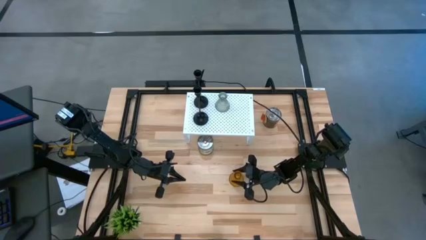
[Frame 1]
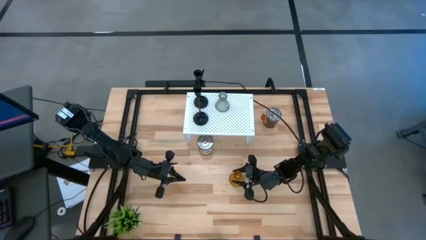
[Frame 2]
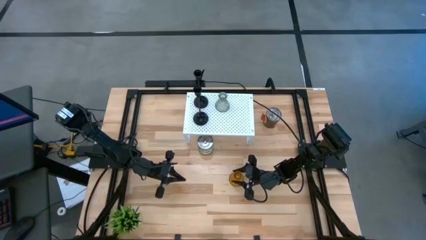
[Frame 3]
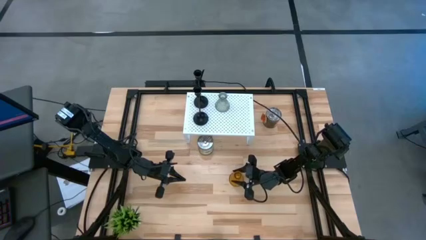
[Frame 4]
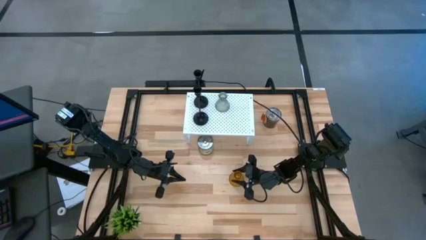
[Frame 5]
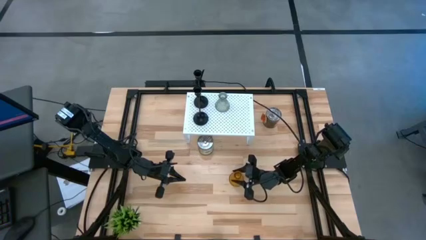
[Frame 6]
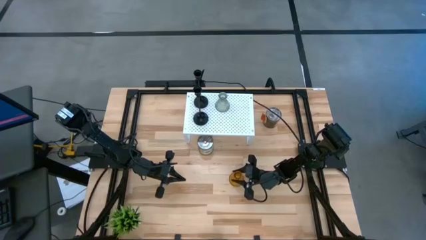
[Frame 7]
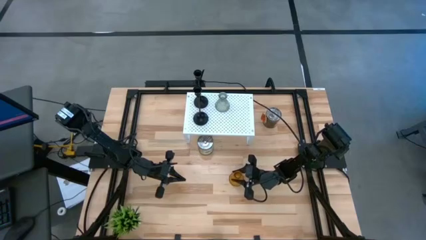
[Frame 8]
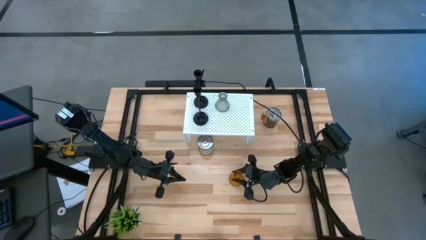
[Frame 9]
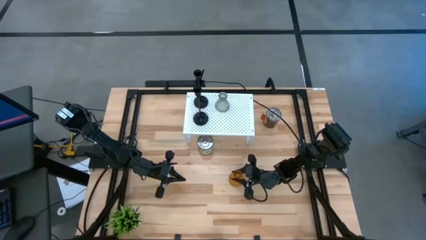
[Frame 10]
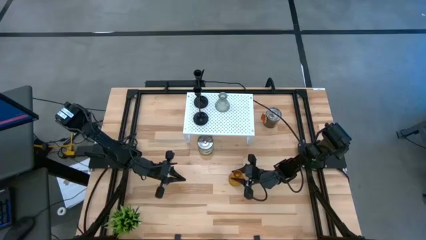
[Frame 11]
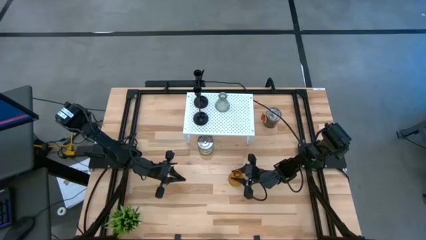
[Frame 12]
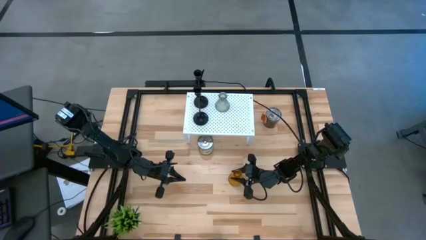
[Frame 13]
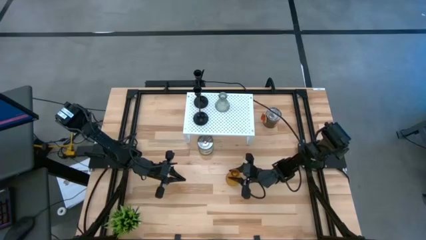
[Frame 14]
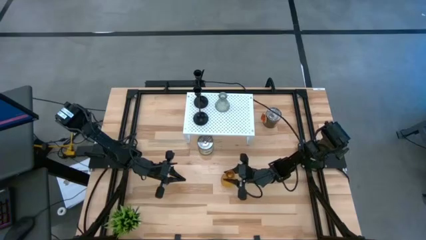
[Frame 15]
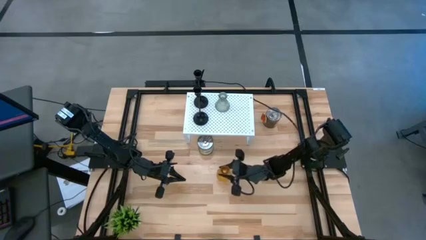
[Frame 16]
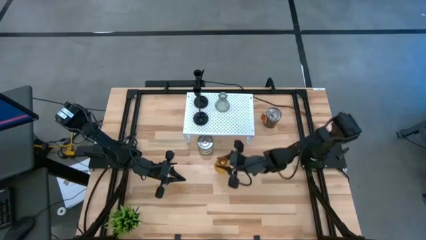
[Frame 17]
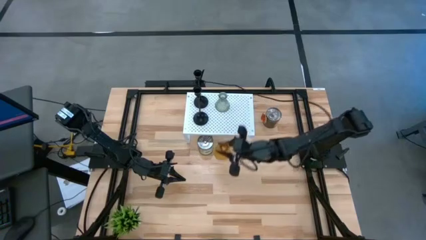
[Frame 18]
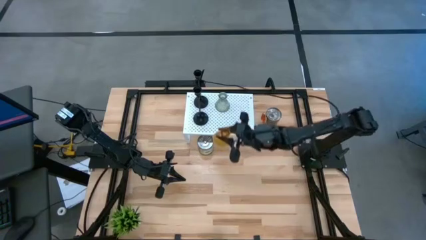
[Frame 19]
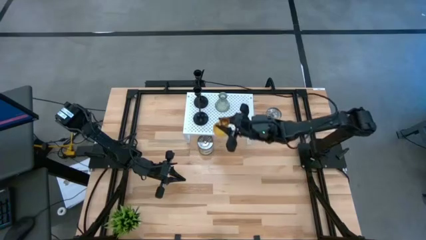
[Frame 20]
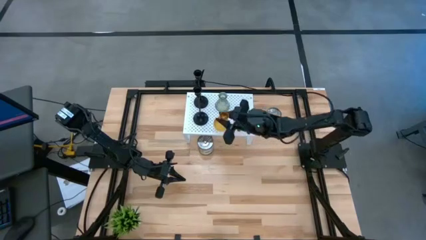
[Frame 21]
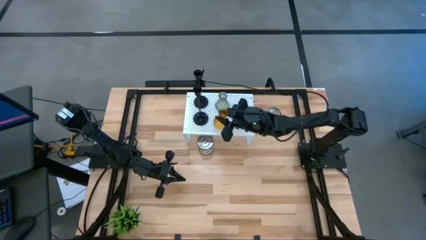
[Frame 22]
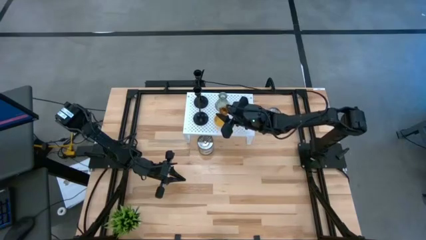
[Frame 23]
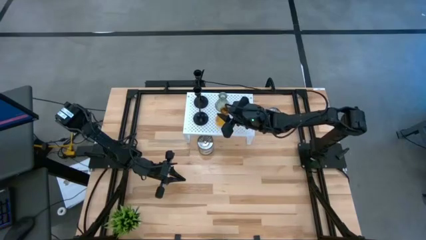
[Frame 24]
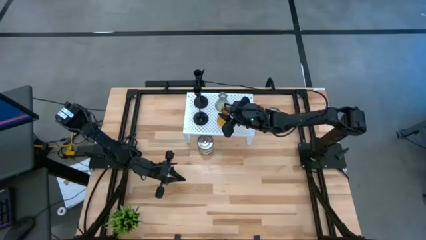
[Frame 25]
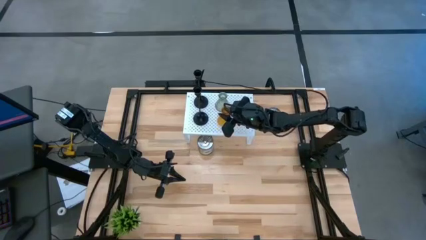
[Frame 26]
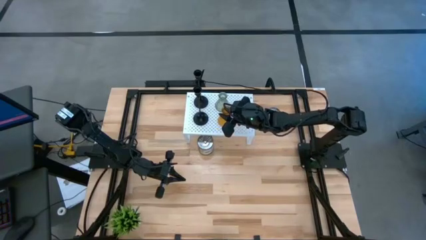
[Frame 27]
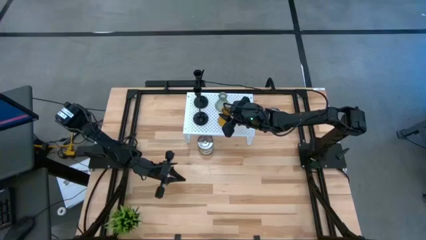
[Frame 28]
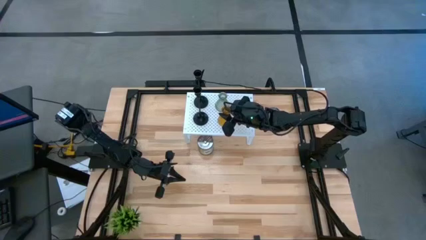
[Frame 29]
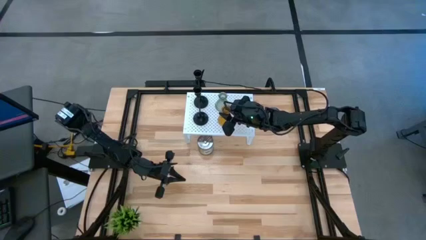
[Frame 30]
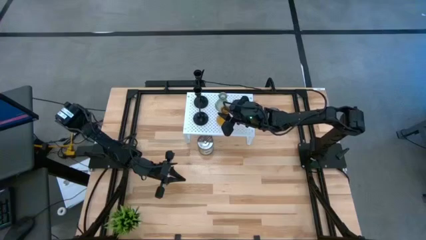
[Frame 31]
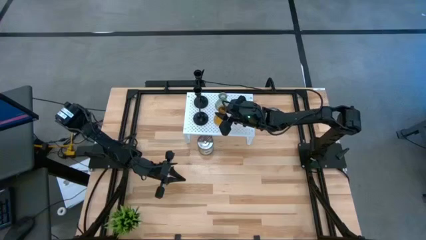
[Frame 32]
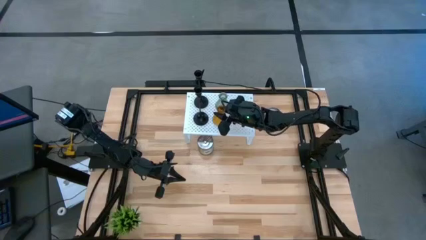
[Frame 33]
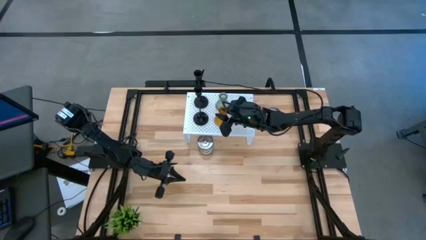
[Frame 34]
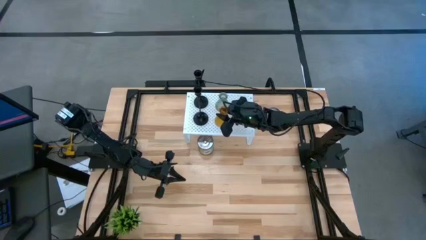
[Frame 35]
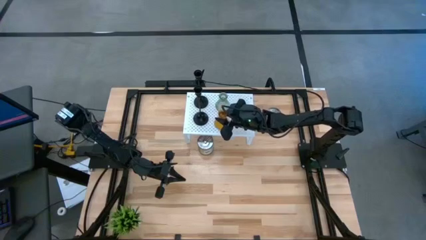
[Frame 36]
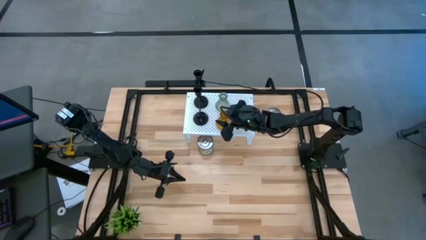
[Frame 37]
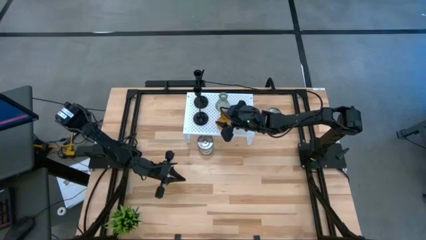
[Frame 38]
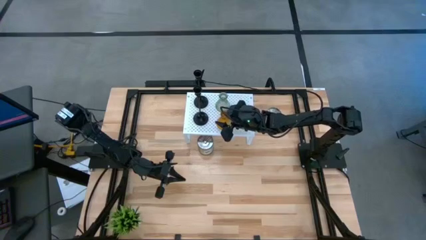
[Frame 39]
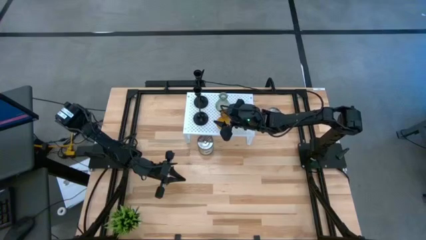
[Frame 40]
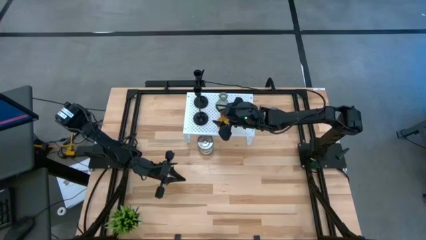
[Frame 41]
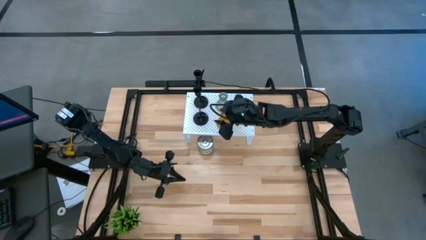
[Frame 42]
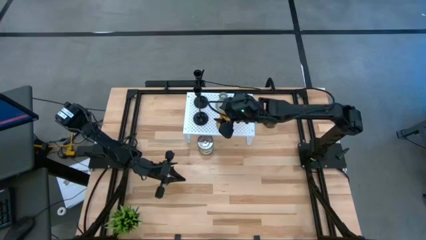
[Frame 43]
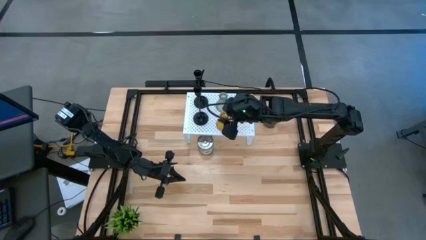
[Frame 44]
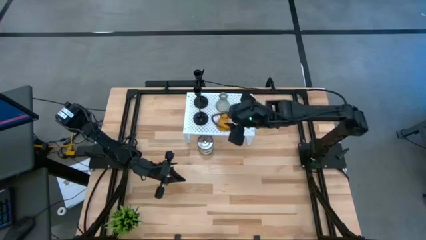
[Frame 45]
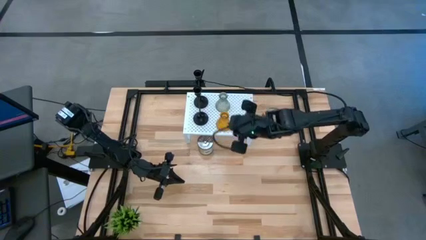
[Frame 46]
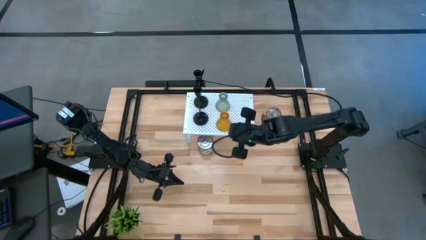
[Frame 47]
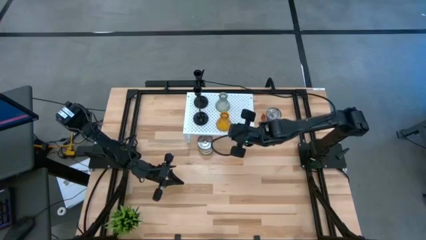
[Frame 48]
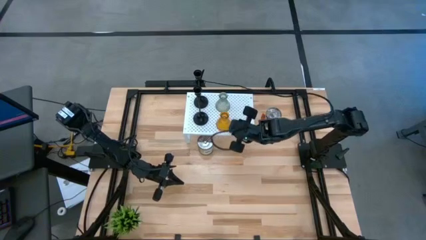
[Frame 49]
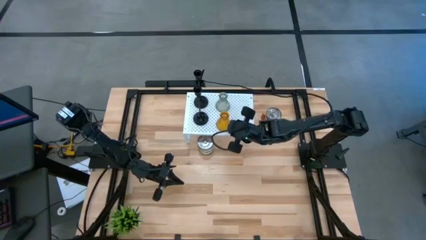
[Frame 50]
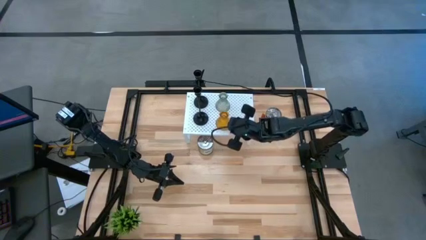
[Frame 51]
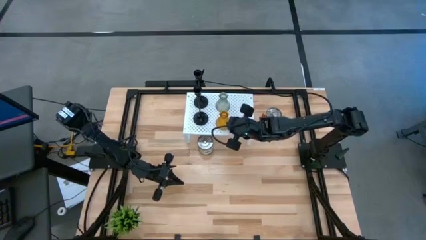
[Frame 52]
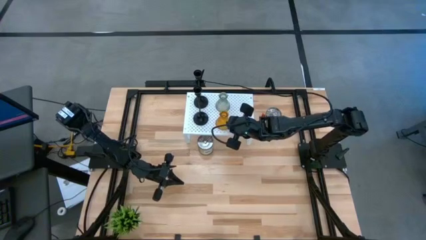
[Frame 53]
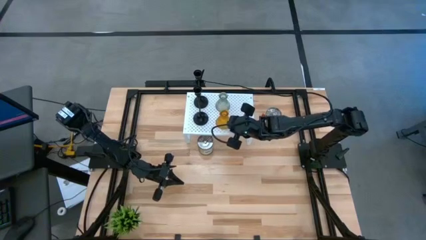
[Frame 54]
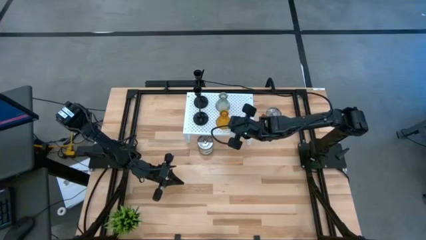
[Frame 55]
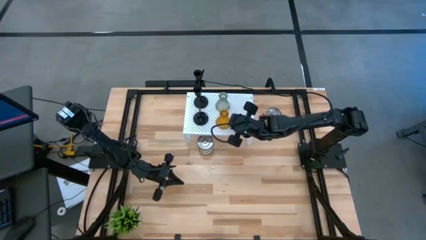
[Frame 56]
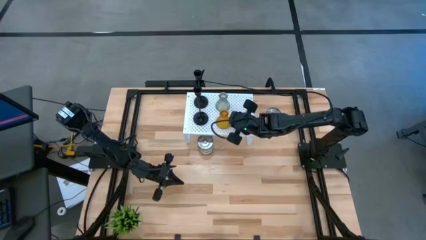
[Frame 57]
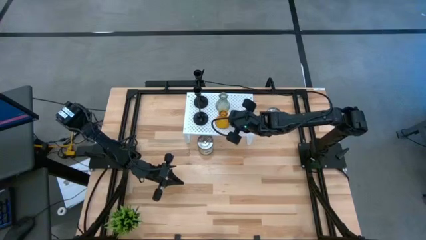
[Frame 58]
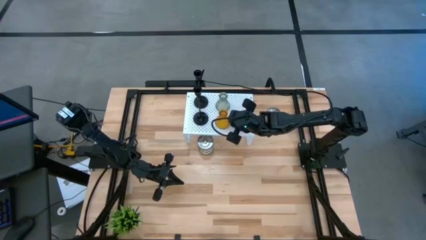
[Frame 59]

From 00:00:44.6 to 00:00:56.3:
Task: Pick & Place candle stick holders
Put the orange glass on the shelf

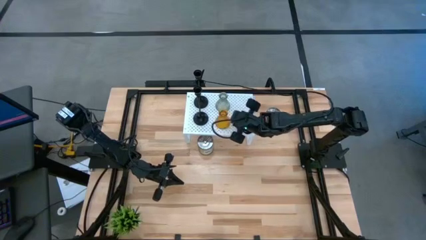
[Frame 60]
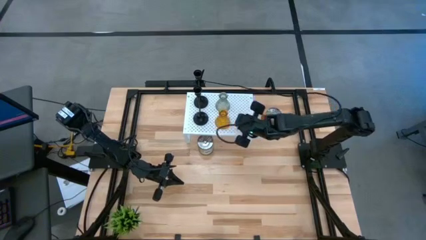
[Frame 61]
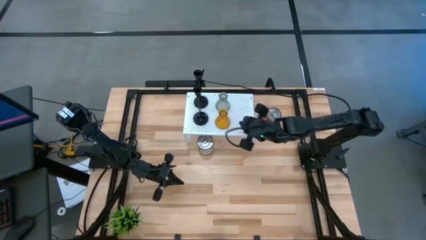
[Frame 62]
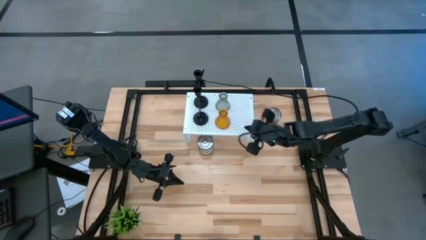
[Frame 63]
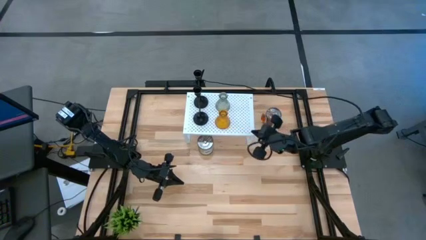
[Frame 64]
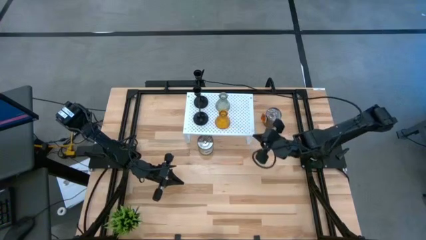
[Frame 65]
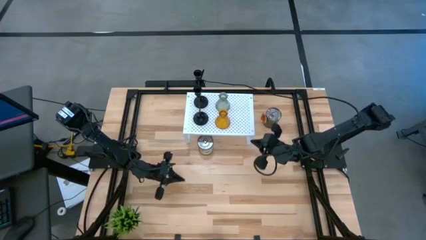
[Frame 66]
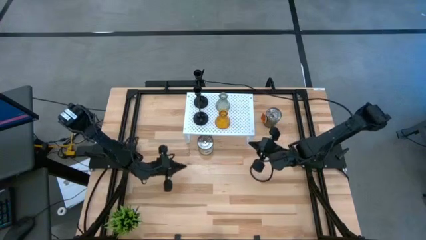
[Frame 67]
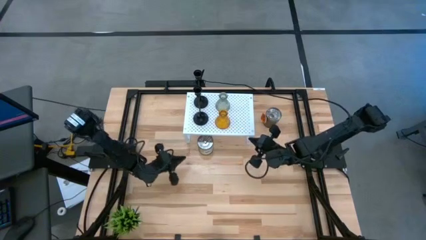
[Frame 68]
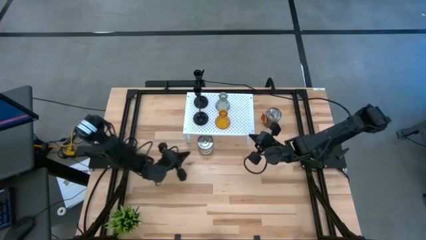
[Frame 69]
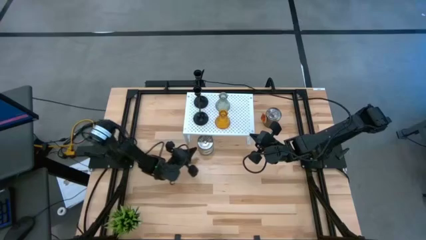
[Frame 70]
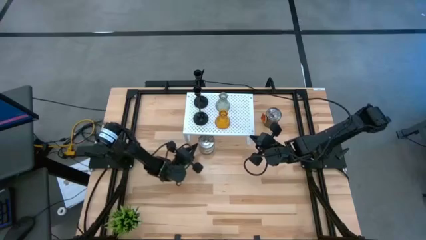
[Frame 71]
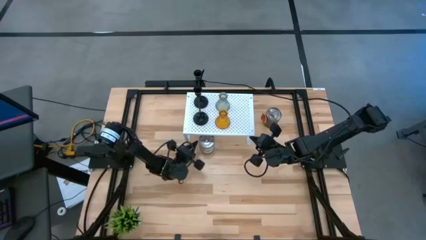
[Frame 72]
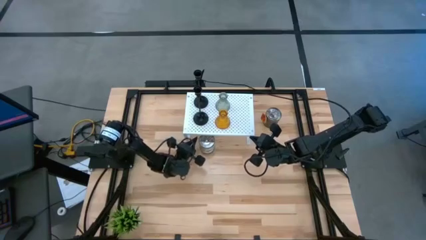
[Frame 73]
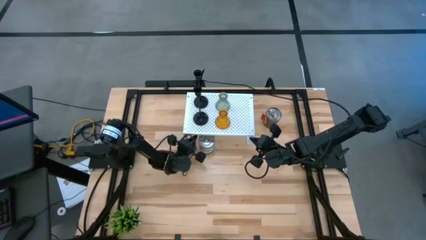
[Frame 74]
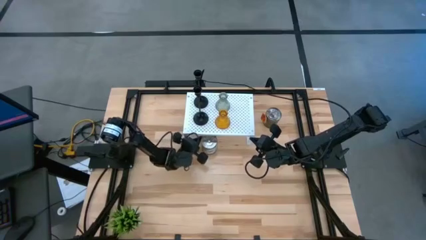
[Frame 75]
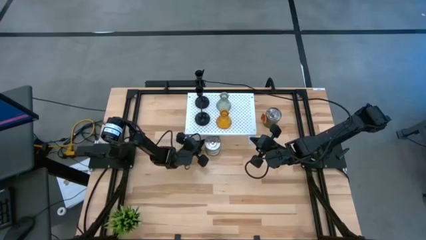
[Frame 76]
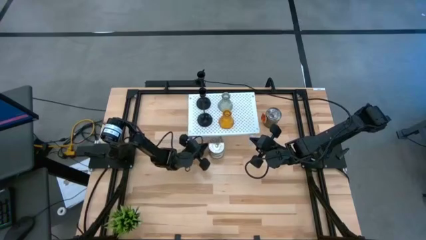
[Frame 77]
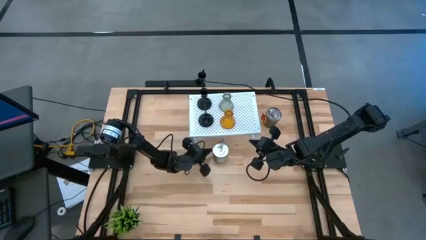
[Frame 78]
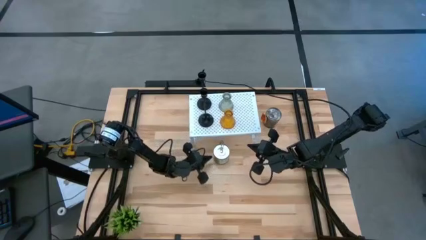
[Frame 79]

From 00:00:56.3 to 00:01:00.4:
Adjust the left scented candle
